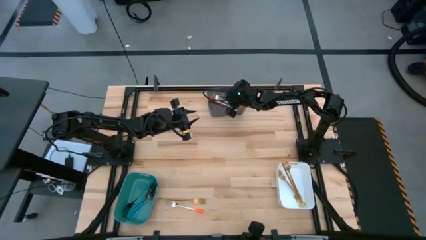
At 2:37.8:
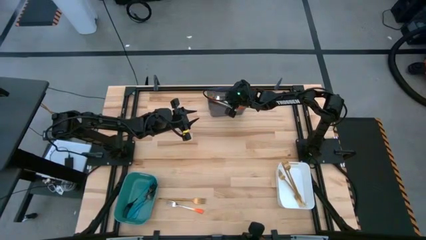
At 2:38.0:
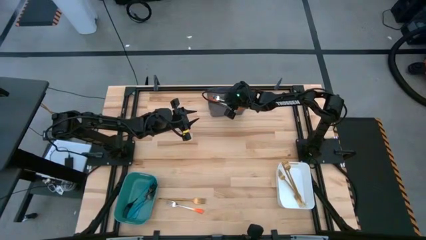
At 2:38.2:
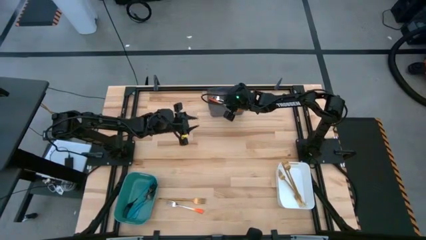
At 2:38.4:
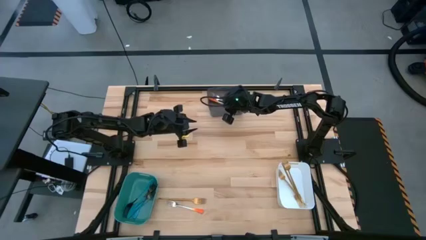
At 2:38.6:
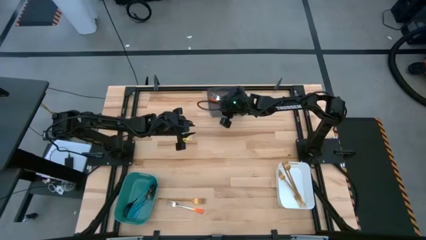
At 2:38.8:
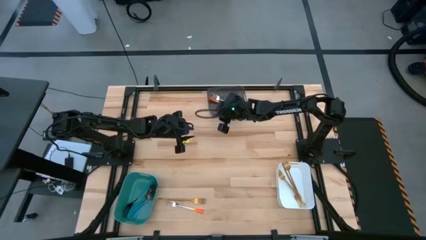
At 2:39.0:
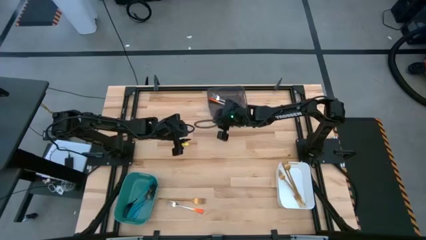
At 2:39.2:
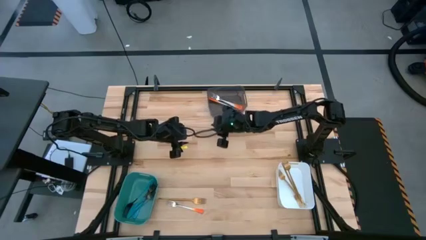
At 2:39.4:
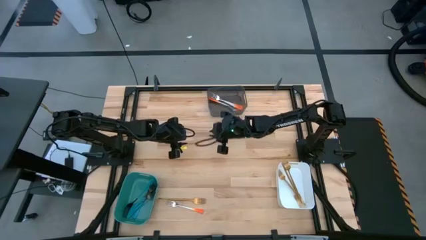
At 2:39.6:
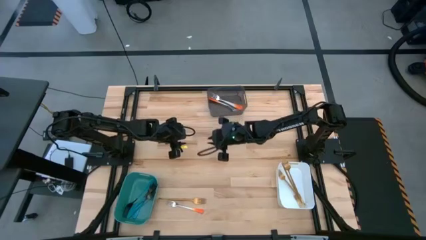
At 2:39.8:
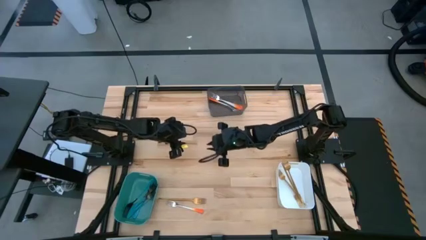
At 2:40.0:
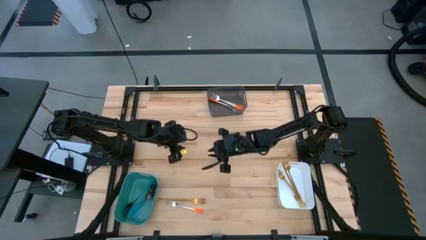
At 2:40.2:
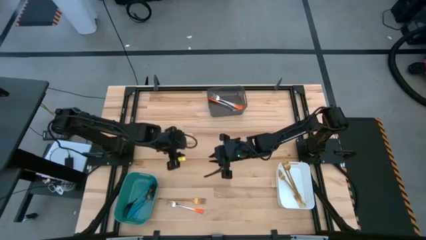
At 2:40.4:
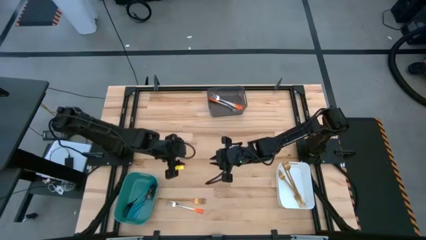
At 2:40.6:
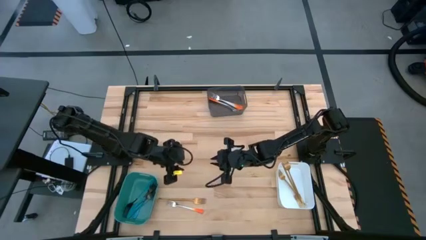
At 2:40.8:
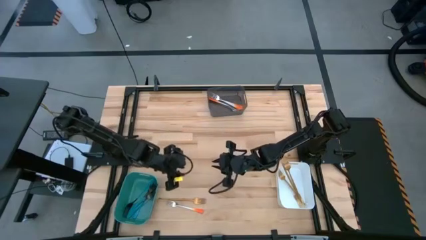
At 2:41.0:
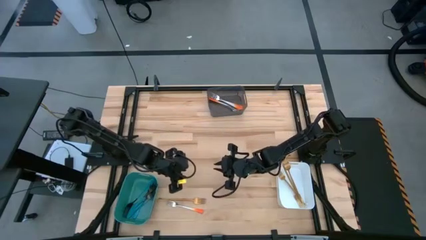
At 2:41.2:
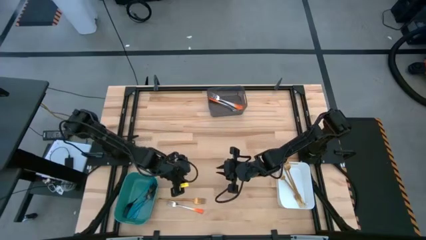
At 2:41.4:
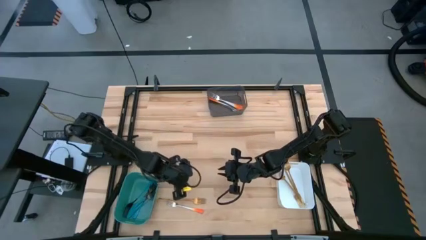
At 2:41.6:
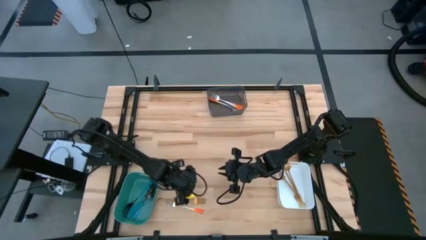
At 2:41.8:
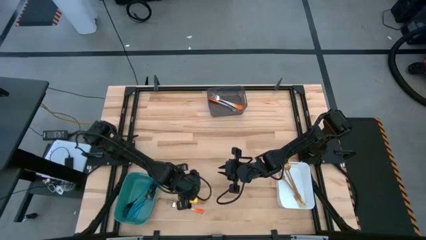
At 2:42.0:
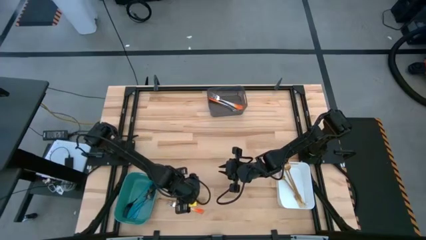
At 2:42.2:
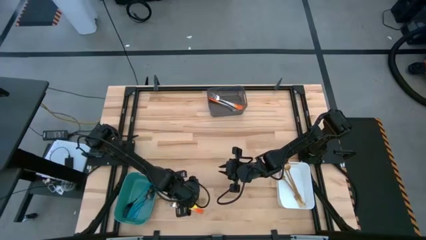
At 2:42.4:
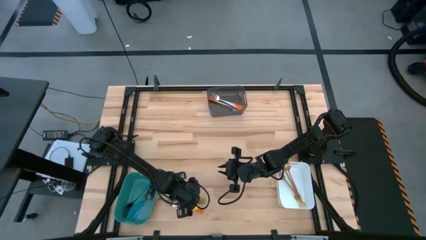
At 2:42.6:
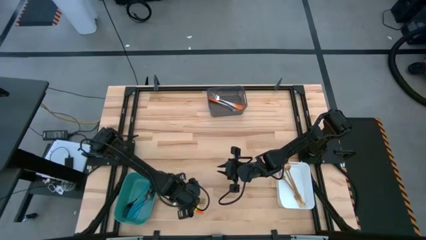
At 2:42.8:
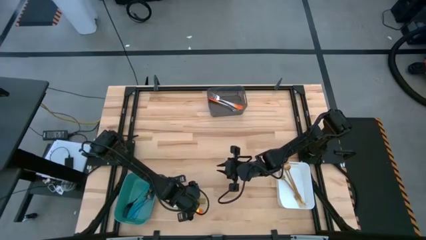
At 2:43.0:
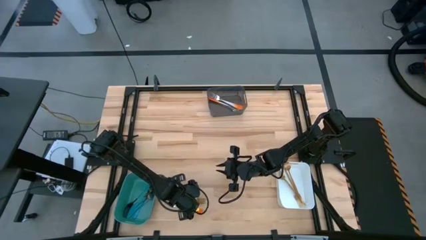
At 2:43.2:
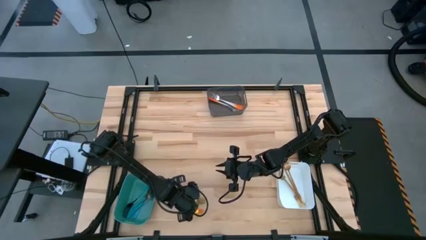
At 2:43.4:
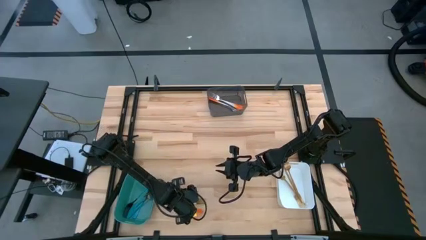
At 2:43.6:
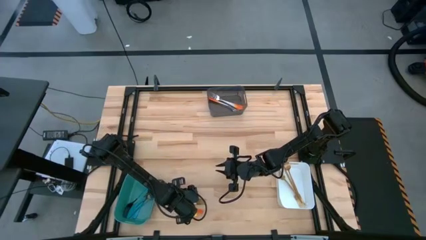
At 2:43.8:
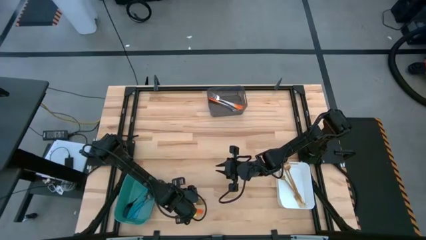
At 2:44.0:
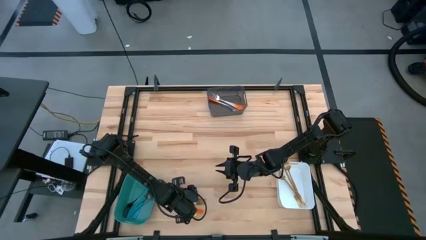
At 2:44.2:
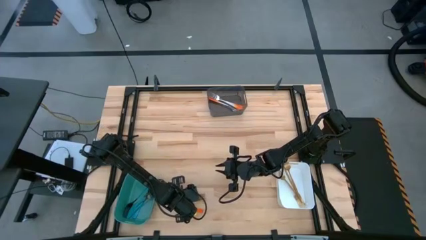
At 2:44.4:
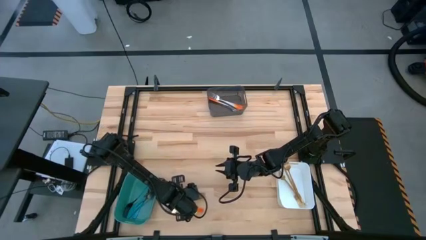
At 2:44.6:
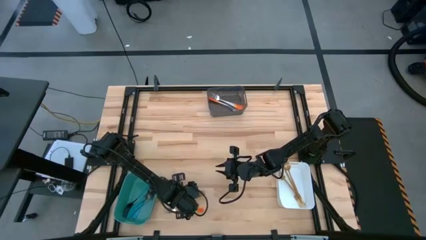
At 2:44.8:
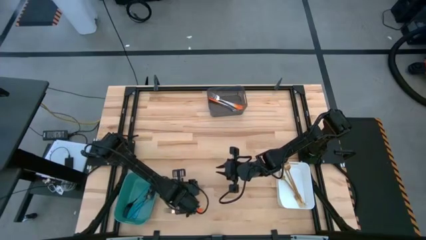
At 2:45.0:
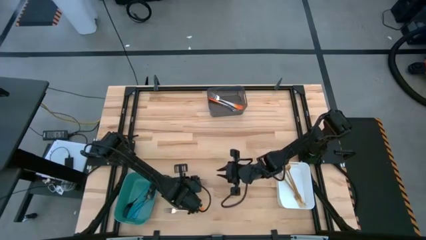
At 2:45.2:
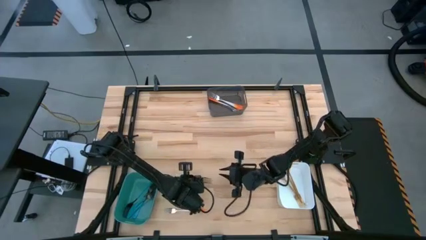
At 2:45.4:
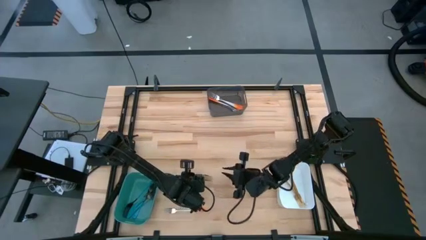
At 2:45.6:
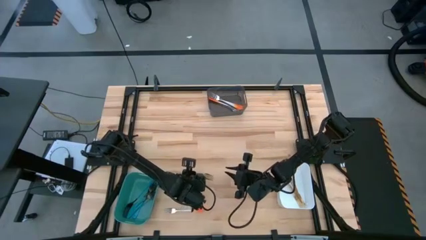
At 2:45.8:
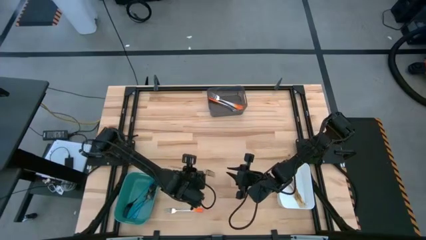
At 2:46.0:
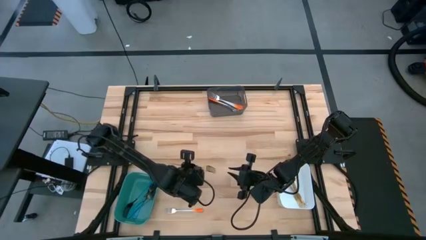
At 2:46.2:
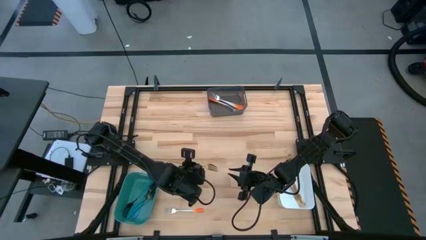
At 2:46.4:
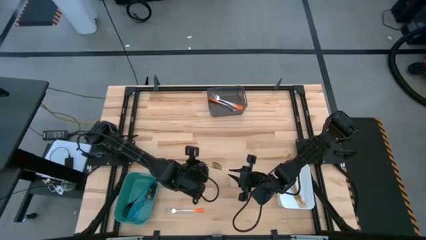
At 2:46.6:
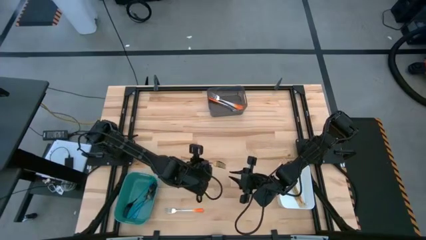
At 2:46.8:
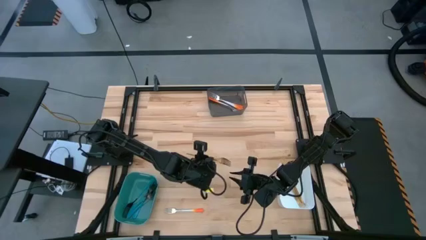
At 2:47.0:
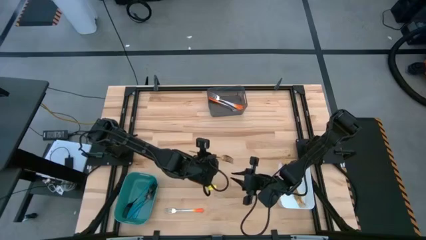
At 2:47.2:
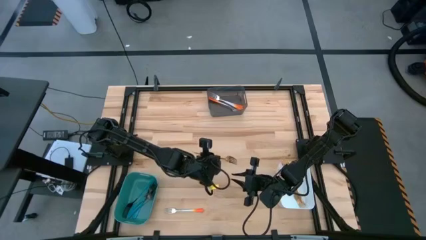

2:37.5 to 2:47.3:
Task: Sort silverware by color (type)
Put the gold fork into the white bin

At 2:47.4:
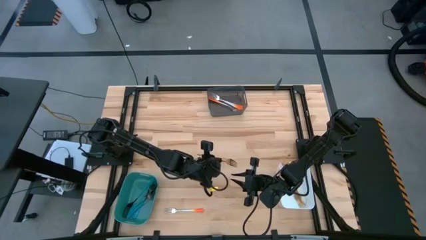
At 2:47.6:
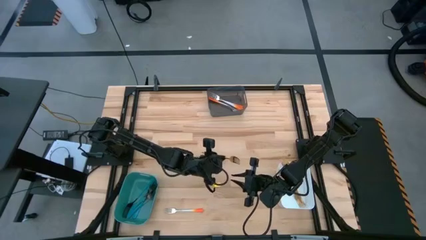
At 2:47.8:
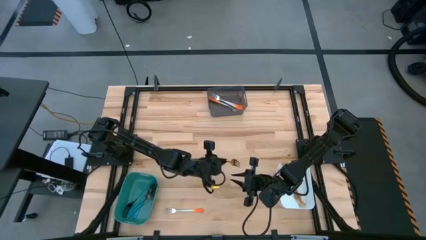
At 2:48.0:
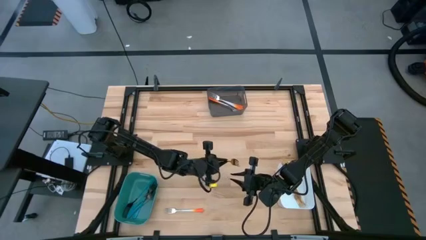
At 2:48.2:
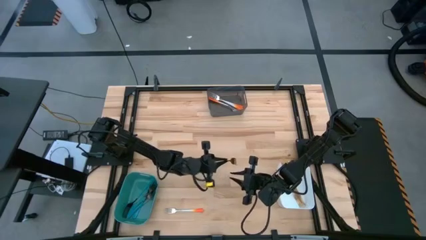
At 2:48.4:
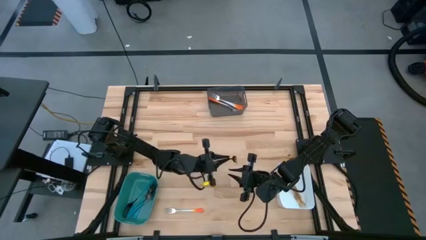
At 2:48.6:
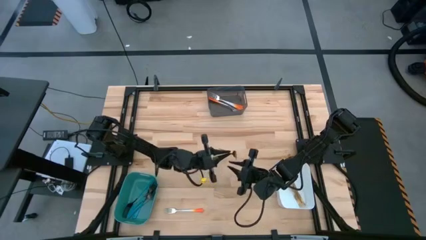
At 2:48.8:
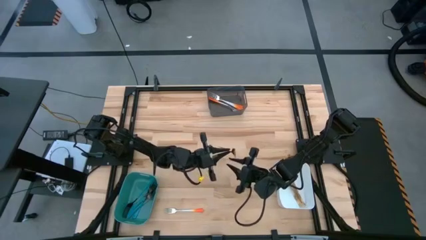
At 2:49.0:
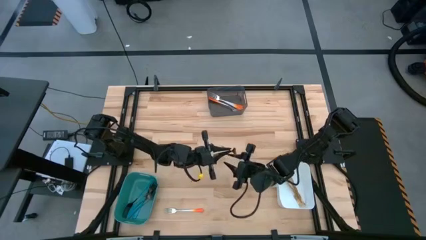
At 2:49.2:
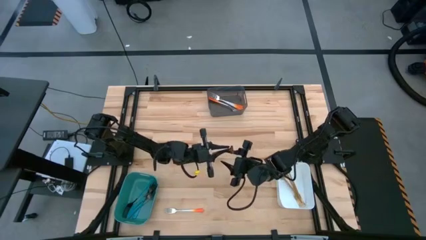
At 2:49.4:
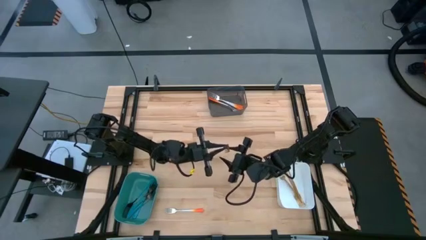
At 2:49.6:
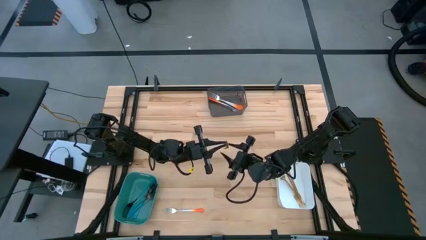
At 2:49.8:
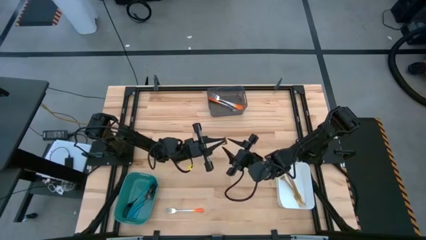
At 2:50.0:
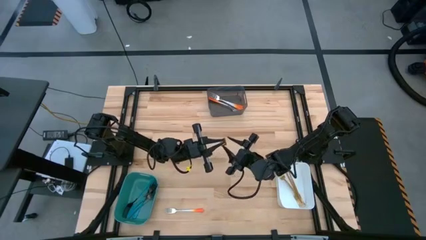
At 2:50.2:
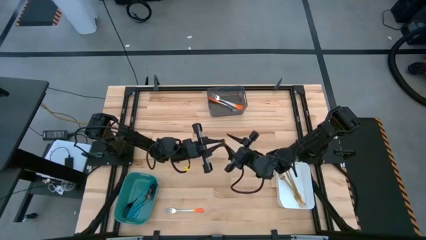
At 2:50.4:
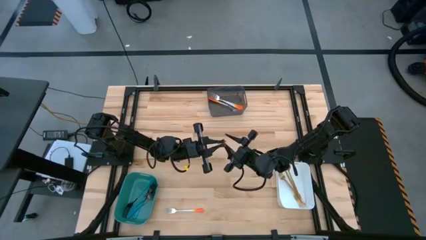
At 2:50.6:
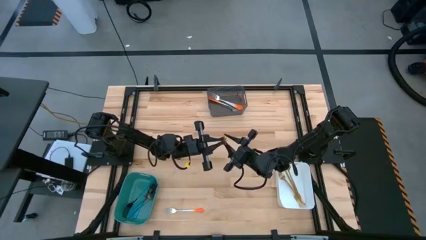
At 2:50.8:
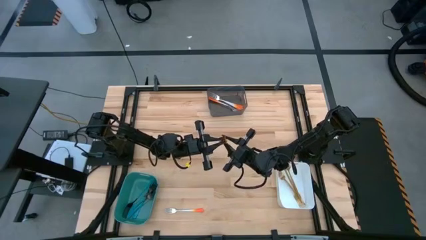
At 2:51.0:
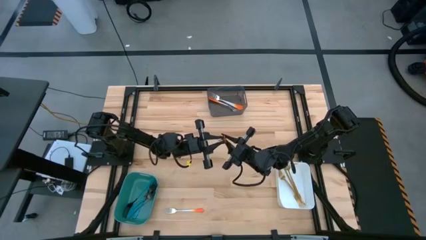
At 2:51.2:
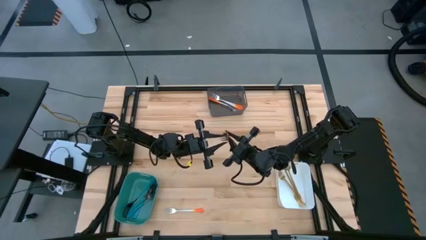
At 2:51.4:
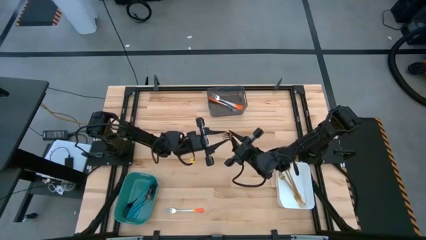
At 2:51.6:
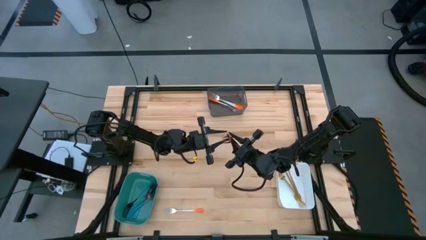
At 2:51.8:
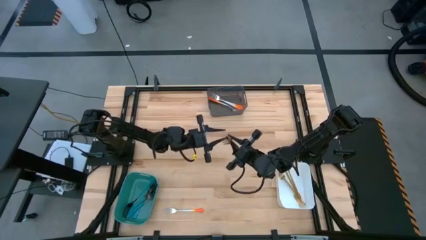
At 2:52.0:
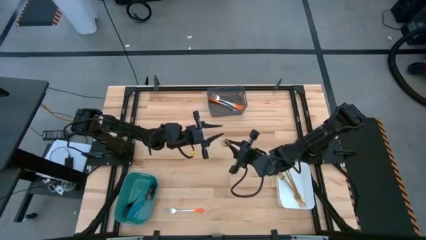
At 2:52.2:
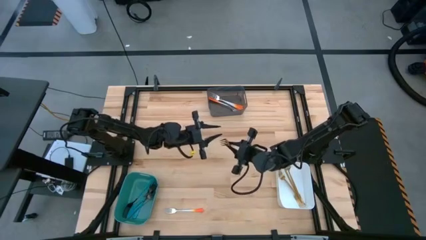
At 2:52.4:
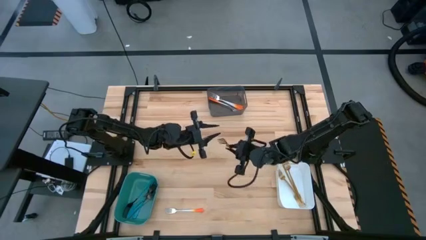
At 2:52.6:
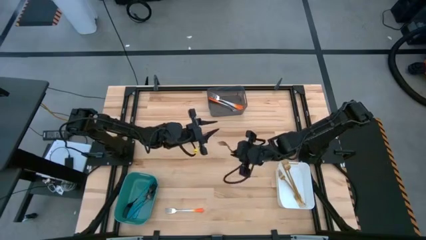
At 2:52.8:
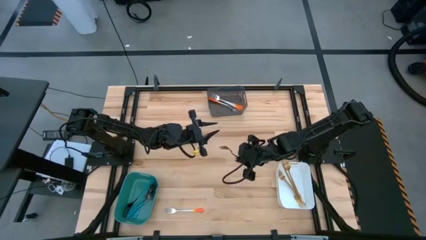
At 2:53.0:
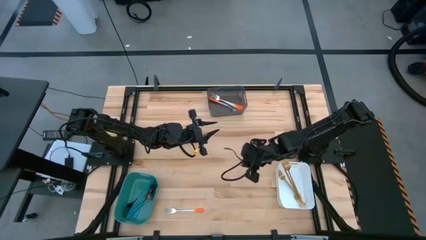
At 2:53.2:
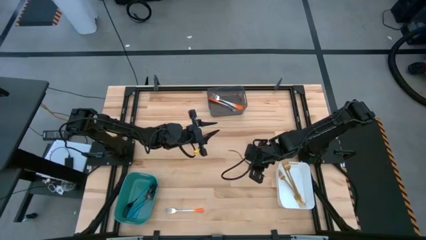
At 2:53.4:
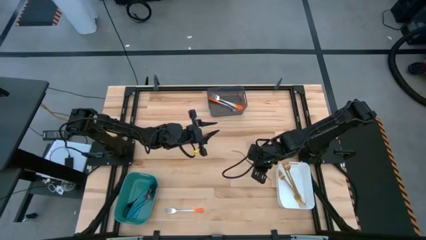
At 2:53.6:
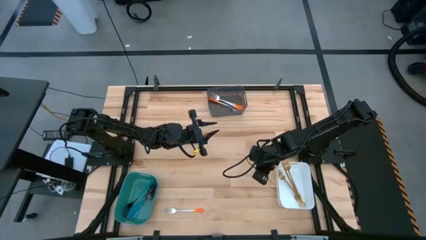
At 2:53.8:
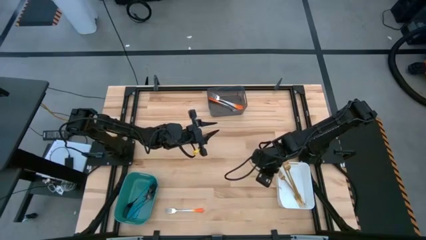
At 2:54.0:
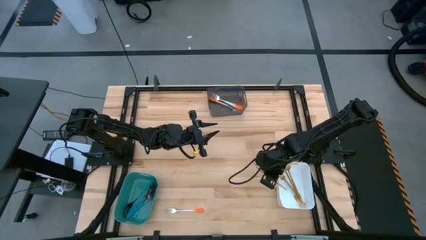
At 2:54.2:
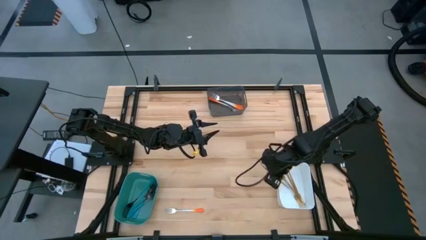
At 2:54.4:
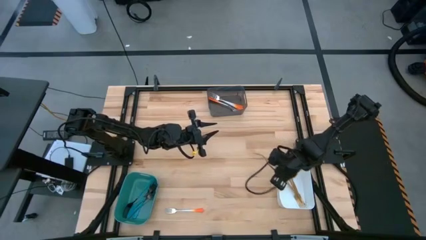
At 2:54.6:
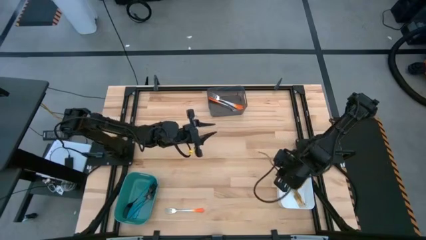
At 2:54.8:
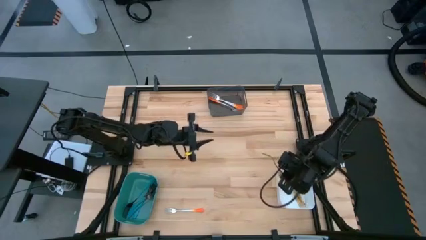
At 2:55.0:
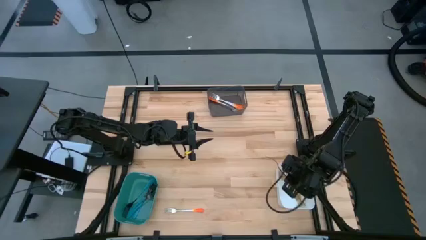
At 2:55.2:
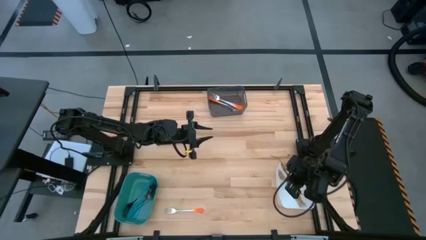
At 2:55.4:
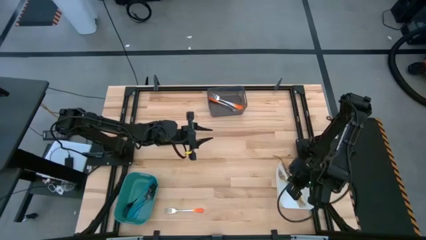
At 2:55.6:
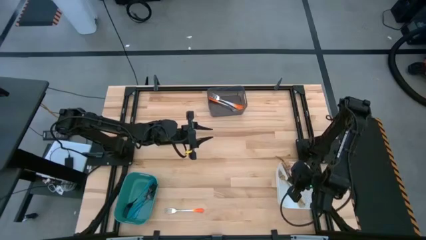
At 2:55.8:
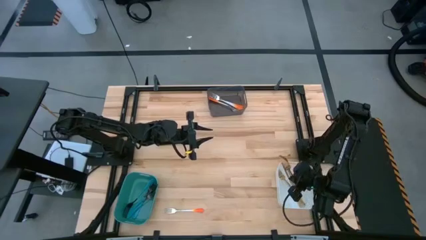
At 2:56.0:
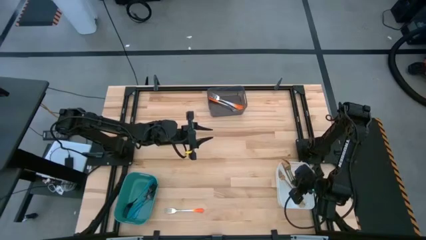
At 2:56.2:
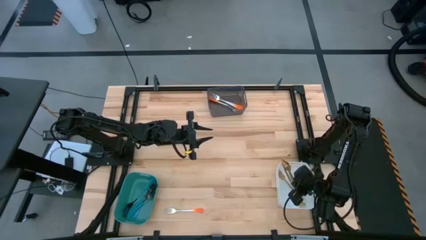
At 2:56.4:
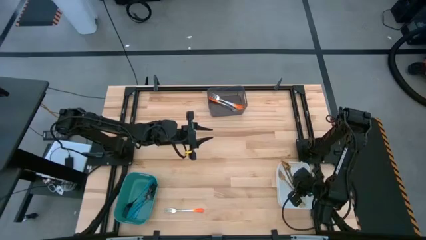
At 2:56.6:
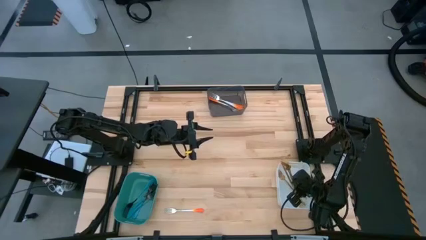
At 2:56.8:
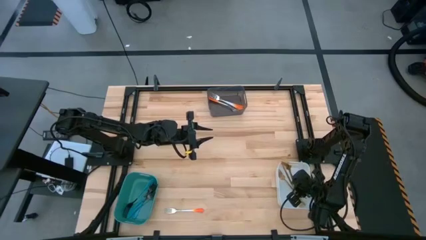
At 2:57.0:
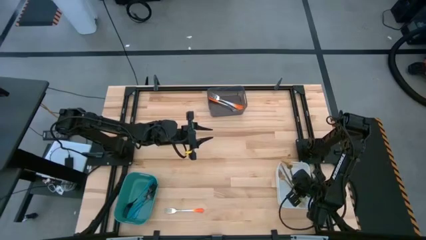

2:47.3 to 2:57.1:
Put the gold fork into the white bin
